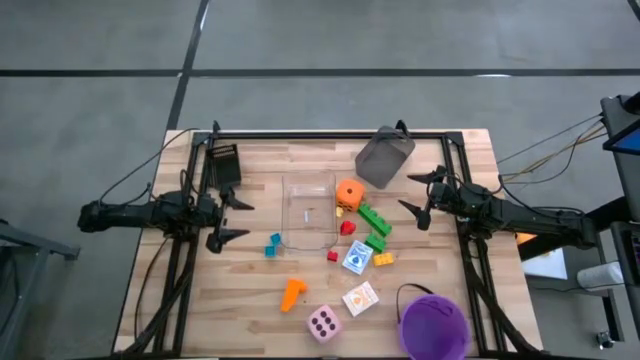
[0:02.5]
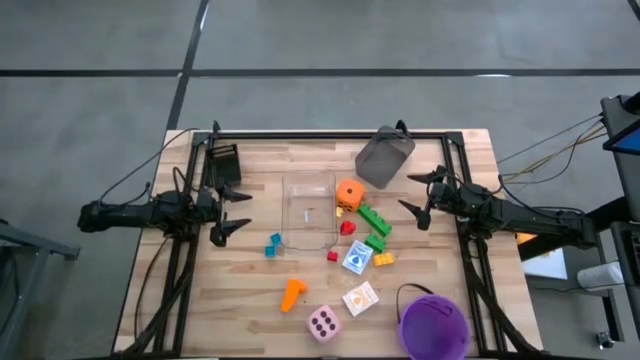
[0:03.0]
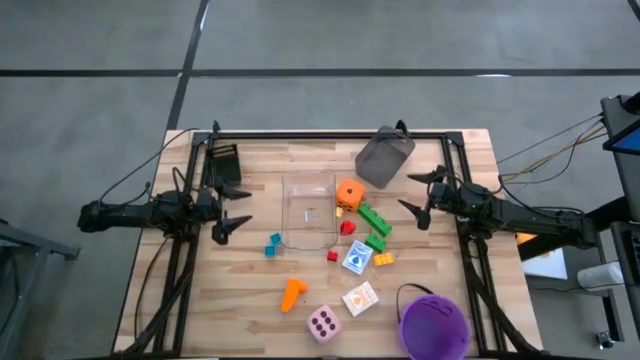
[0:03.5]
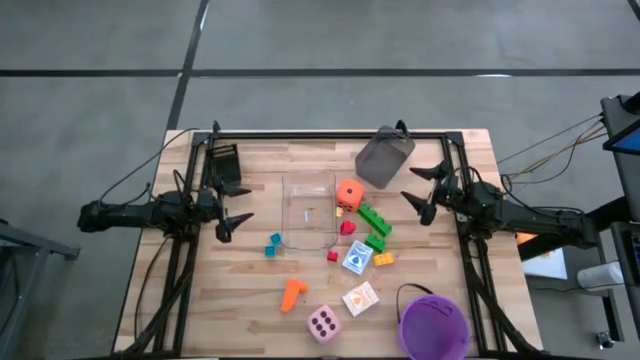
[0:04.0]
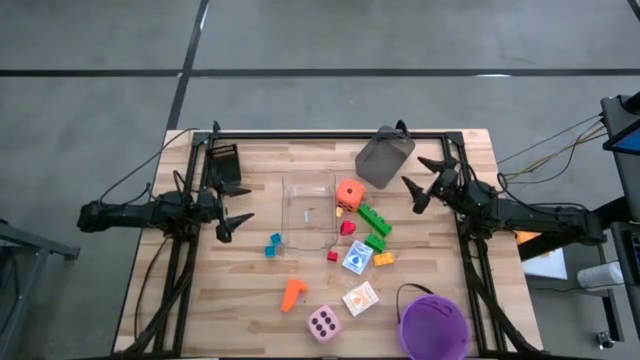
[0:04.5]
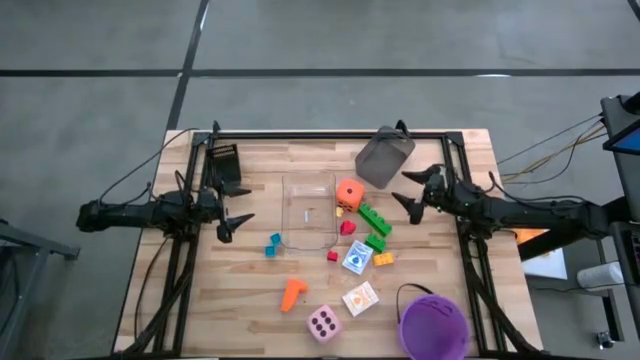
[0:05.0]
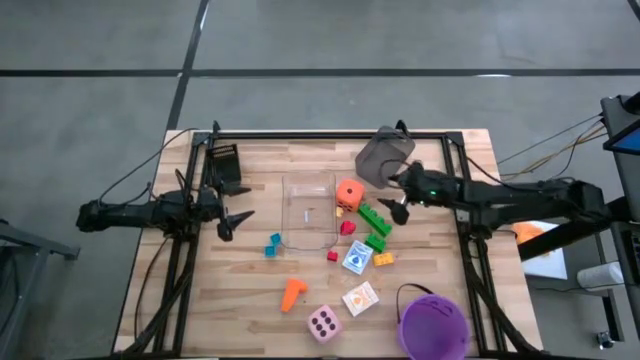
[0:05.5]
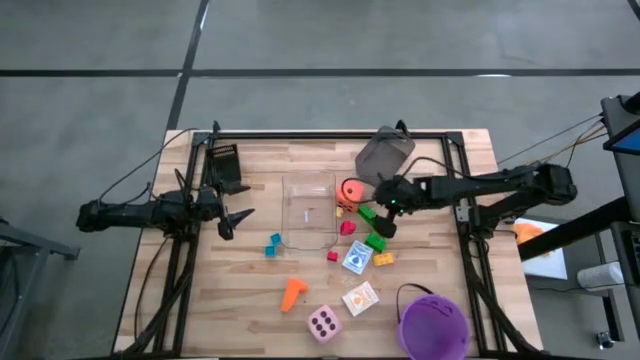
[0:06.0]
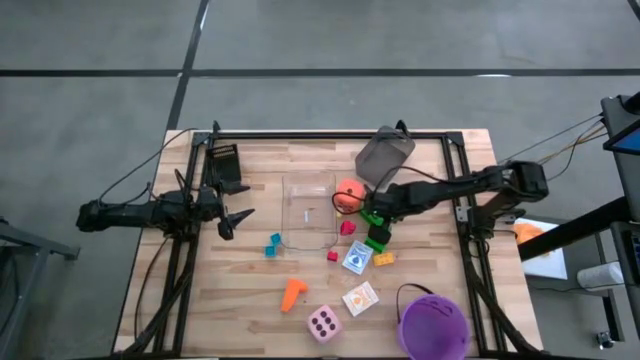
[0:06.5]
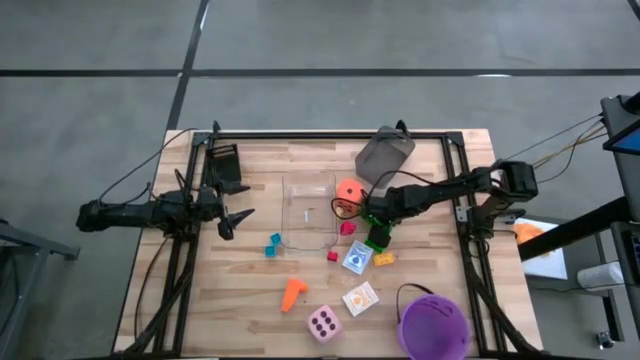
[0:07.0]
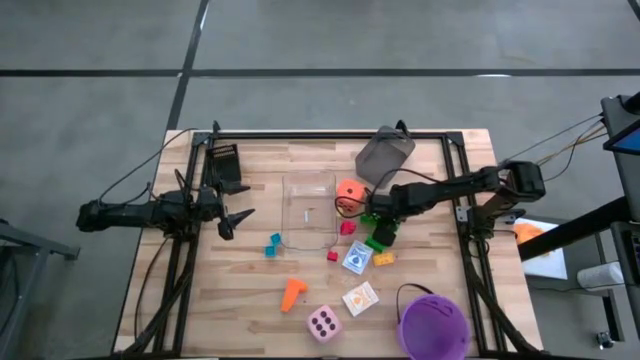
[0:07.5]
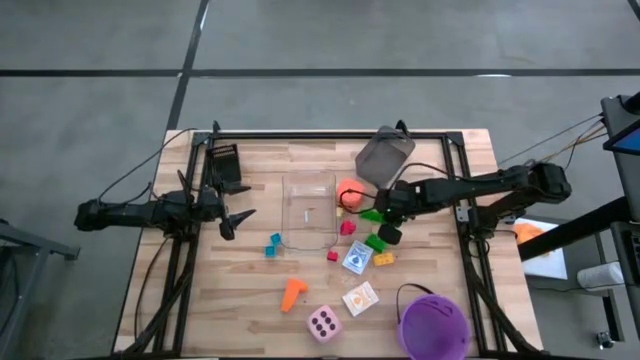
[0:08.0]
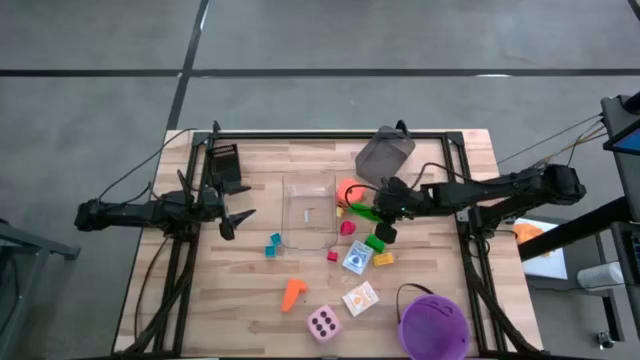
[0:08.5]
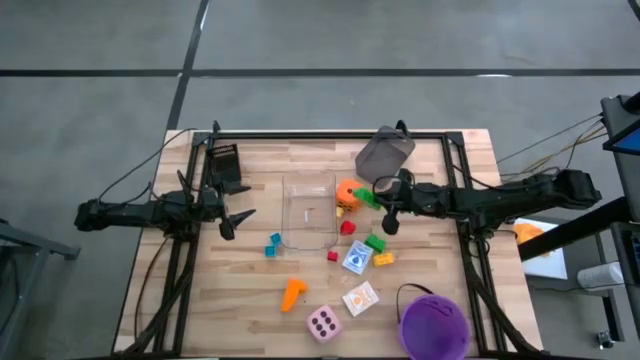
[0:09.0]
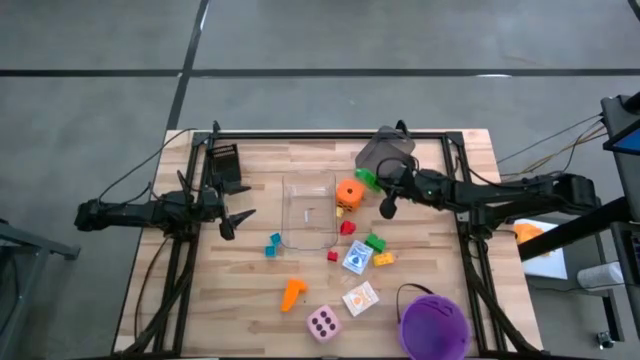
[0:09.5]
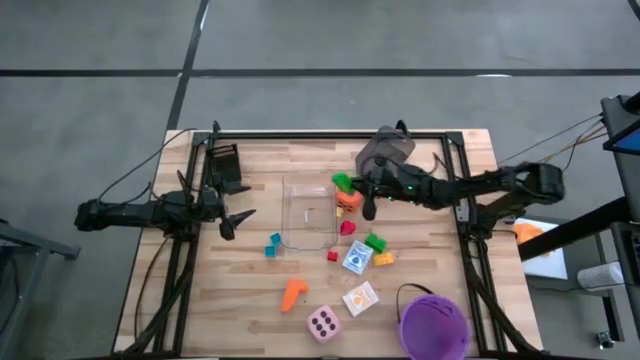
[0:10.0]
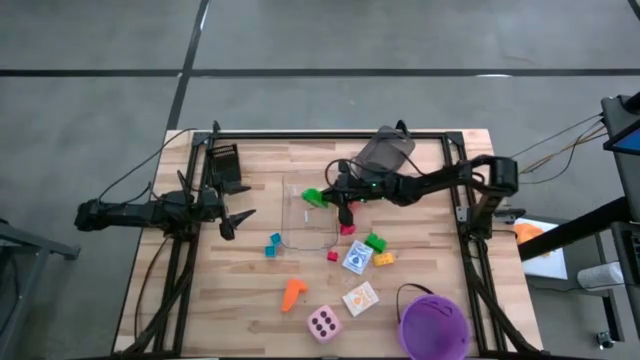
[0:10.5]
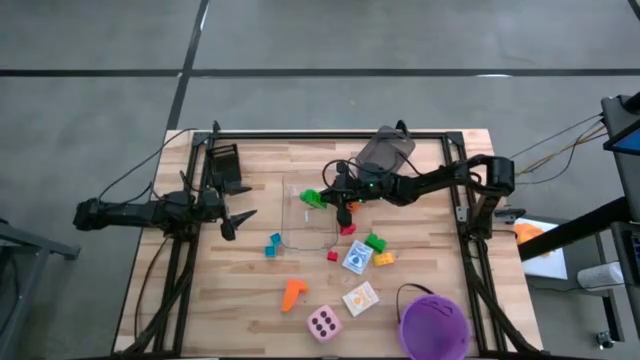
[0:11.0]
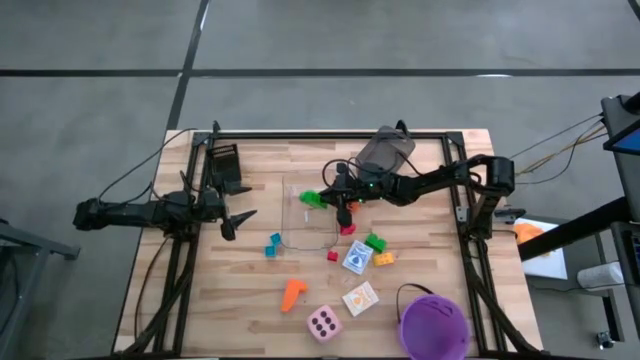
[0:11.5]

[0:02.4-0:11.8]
Task: Pick & Place Toys
Put the green game piece into the transparent bin

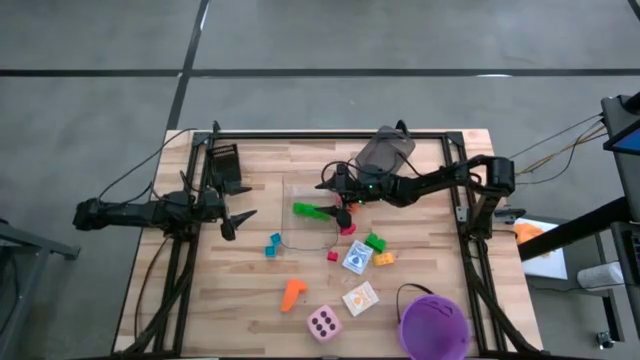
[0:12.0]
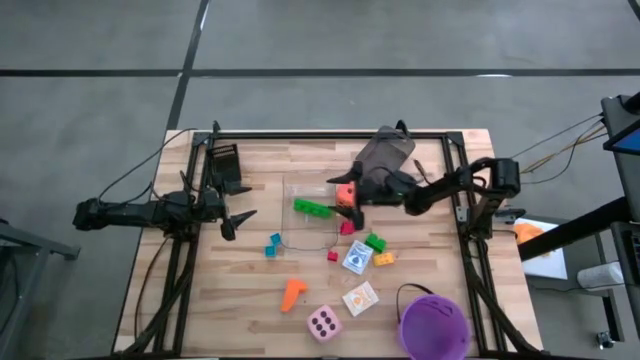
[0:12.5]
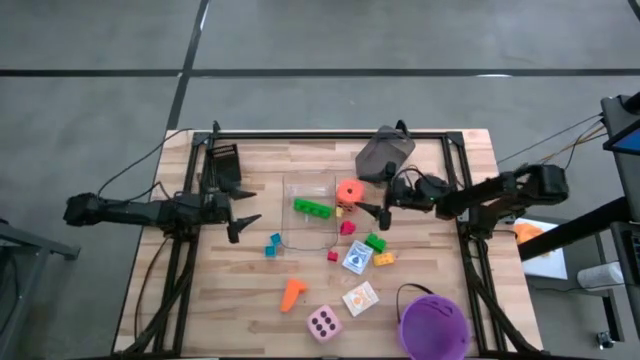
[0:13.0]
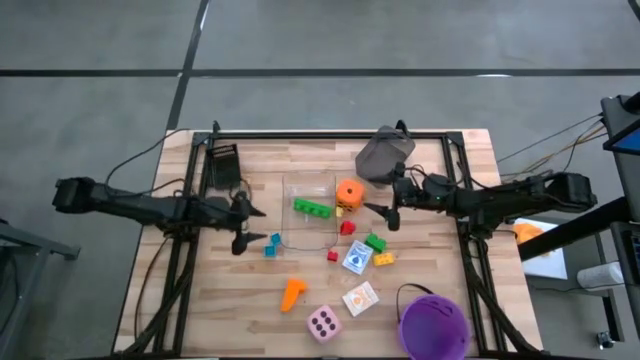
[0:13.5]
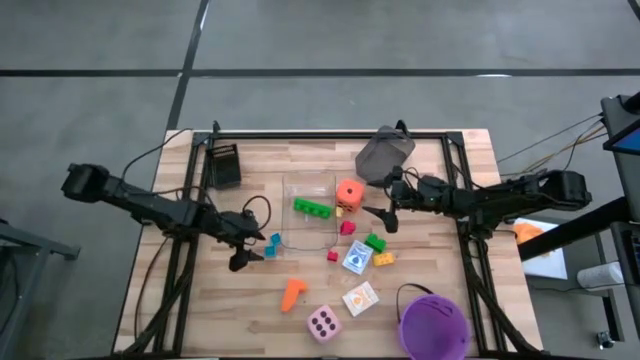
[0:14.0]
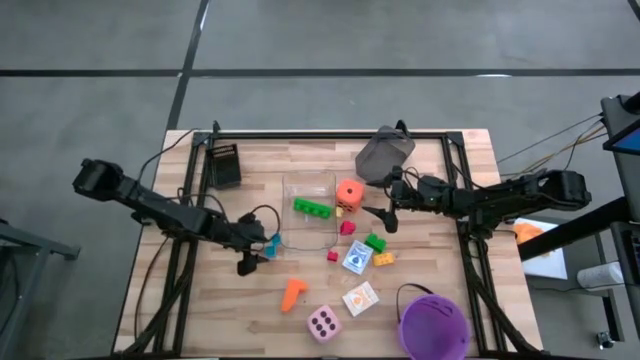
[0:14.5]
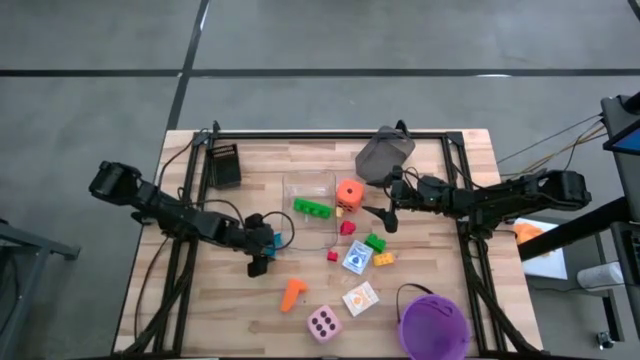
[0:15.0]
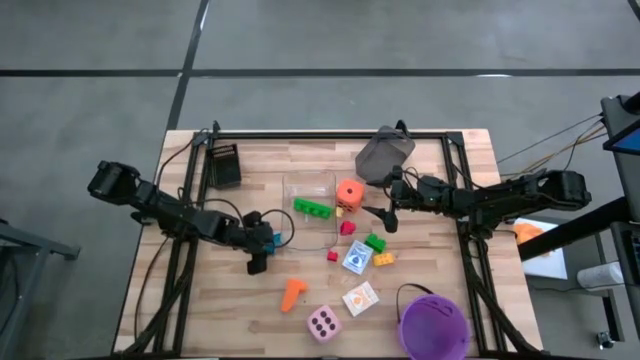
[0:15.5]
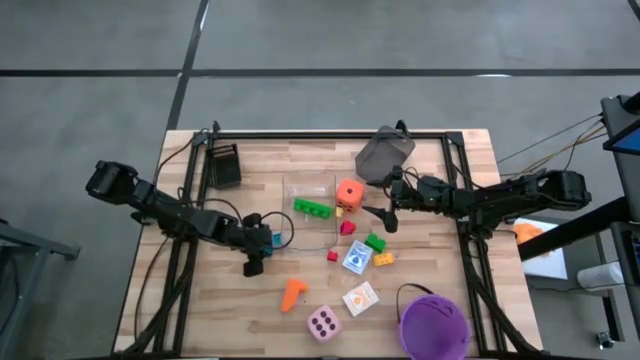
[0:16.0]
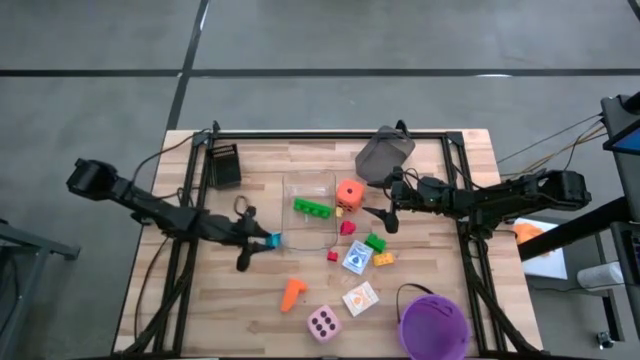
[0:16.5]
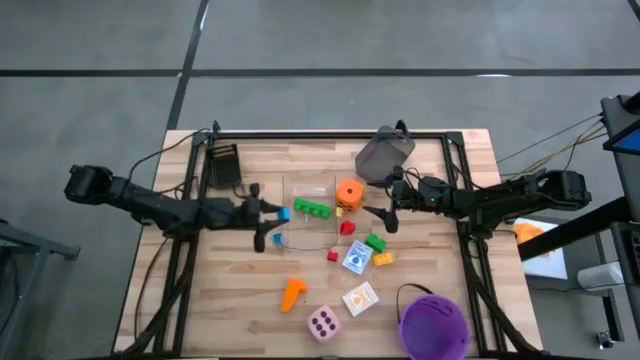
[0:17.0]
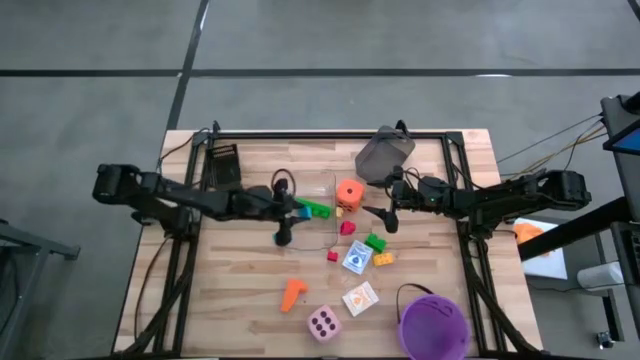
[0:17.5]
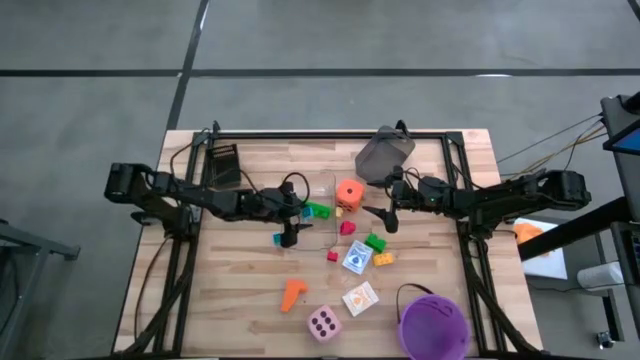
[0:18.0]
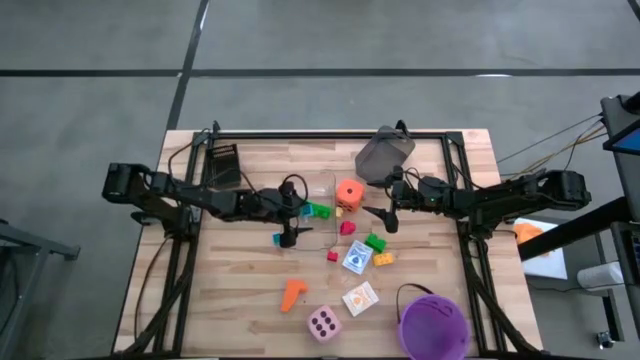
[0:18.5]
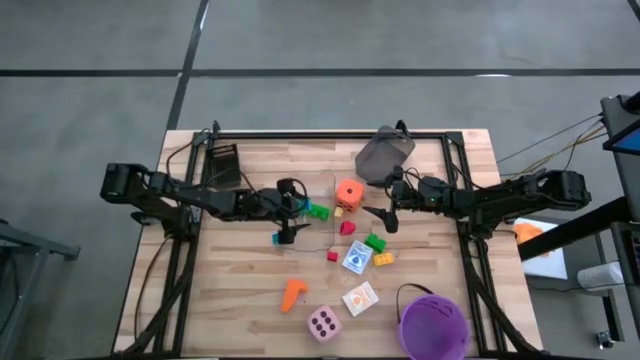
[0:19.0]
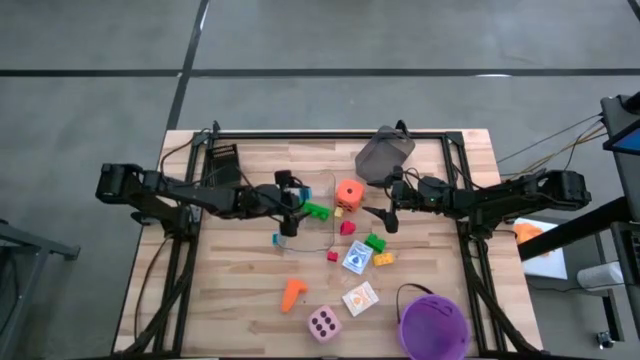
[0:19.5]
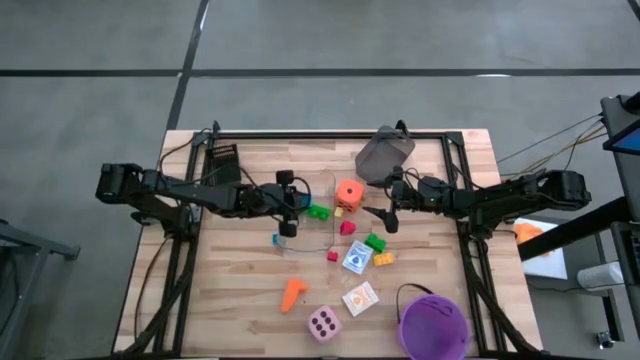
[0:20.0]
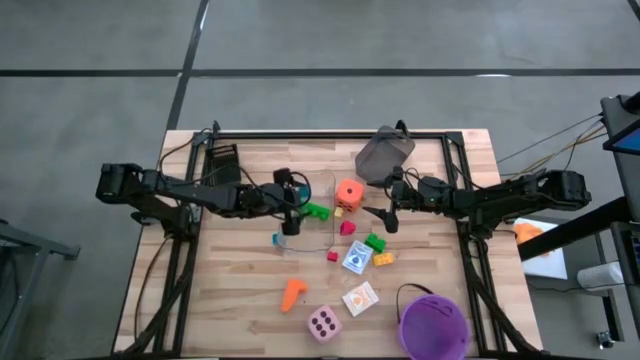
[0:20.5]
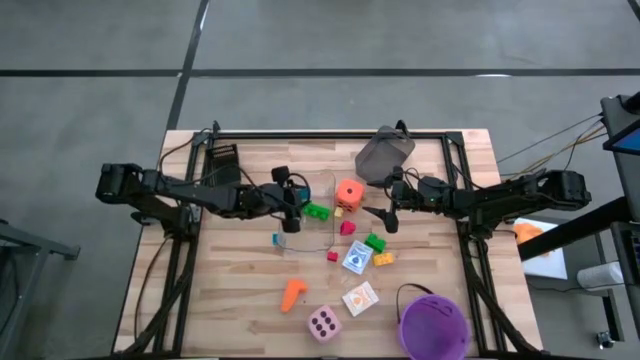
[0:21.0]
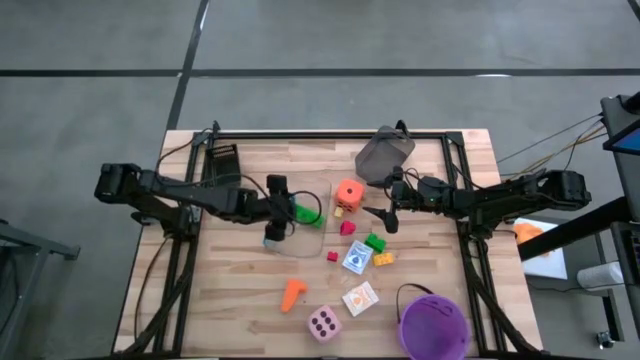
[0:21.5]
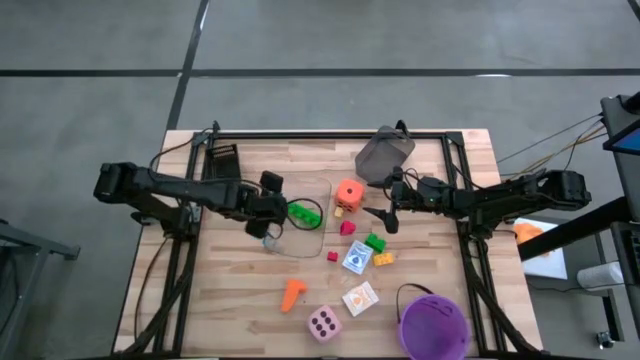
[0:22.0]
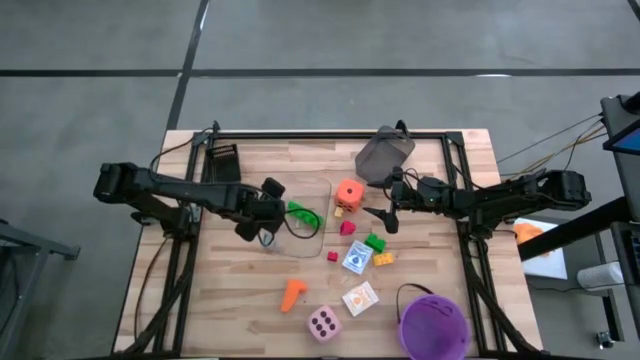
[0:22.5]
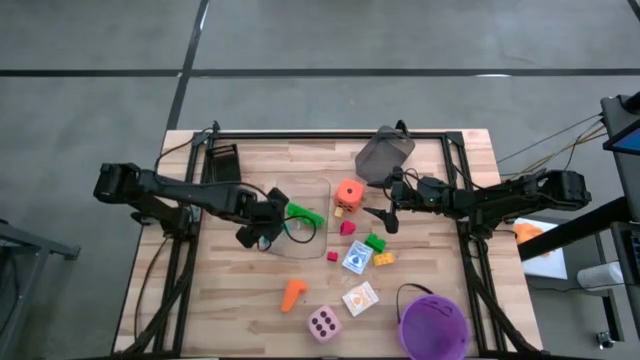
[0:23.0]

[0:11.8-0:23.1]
Put the bottom blue game piece into the transparent bin
